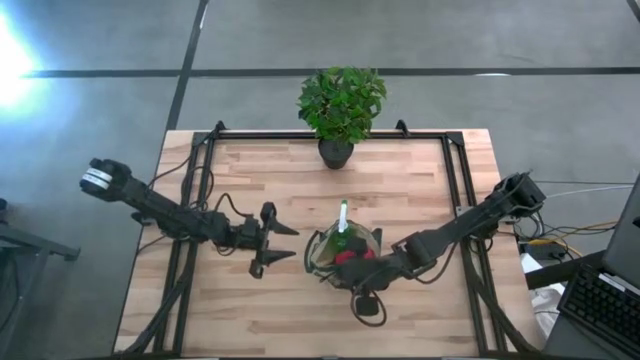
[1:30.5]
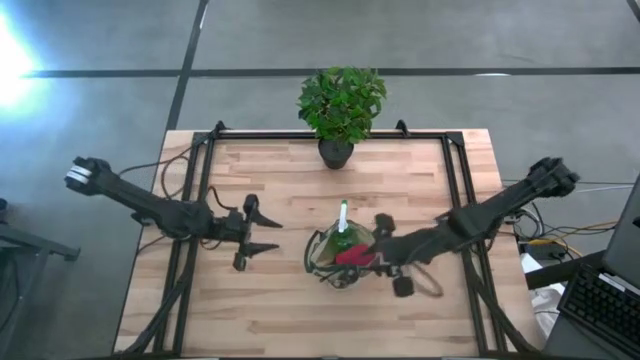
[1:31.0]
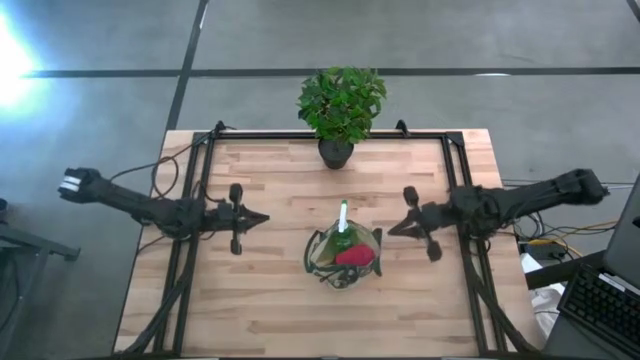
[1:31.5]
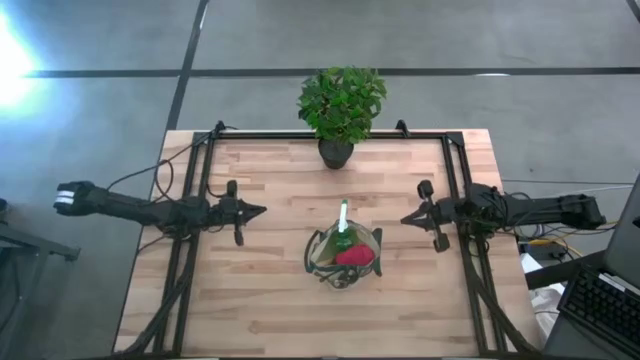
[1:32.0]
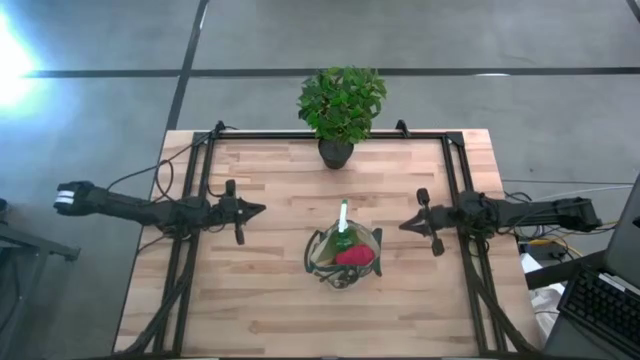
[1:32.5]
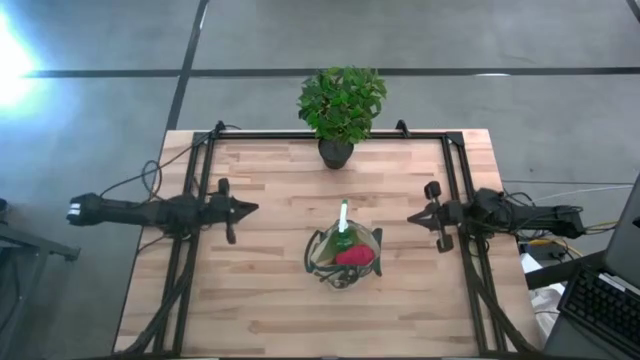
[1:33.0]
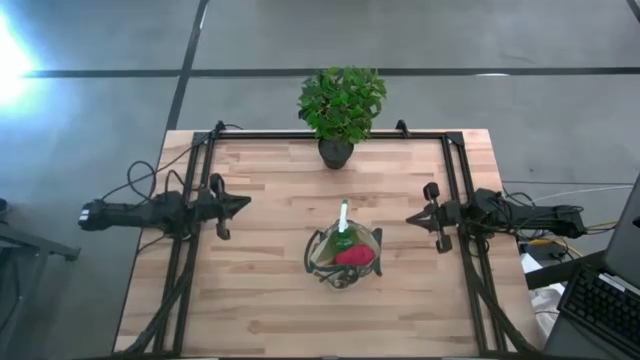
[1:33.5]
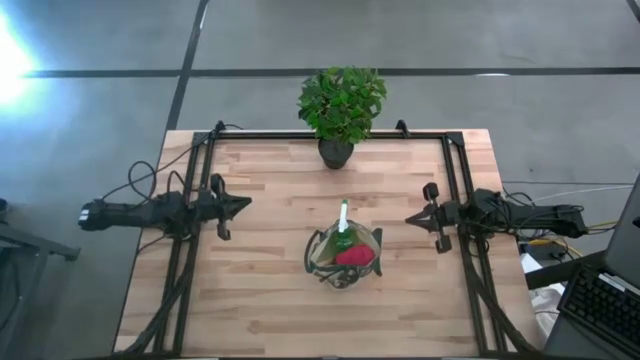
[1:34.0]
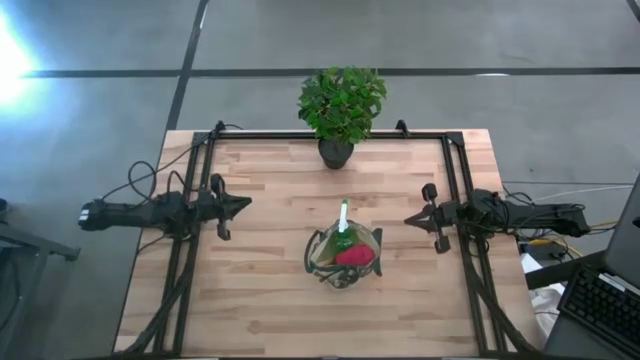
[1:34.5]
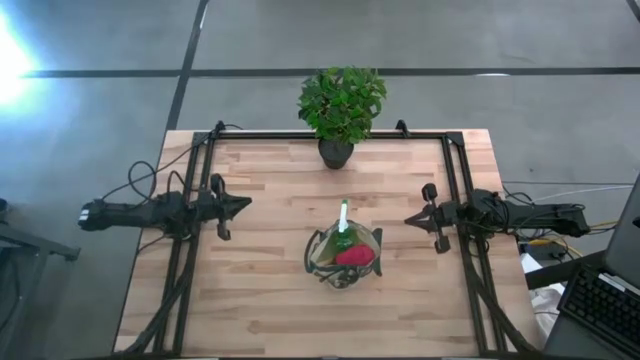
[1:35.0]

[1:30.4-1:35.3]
Task: Pick & Place Garden tools in Gardening bag
Return to Home Position

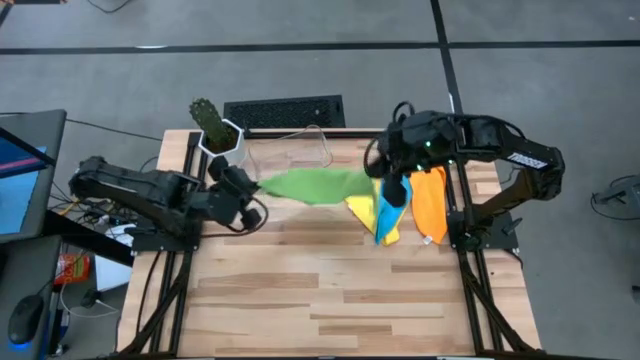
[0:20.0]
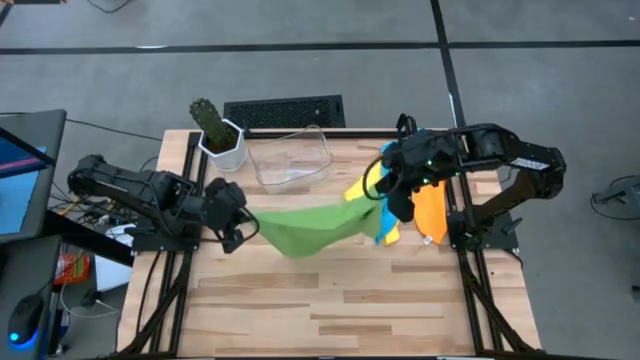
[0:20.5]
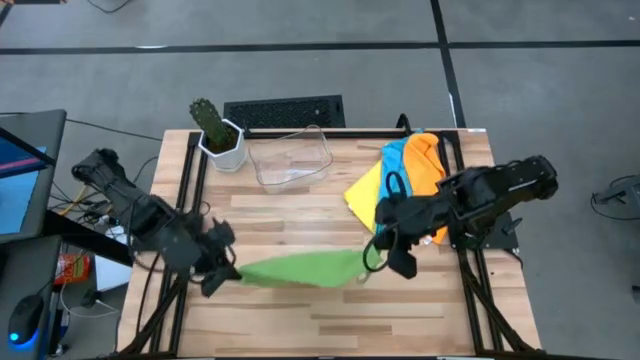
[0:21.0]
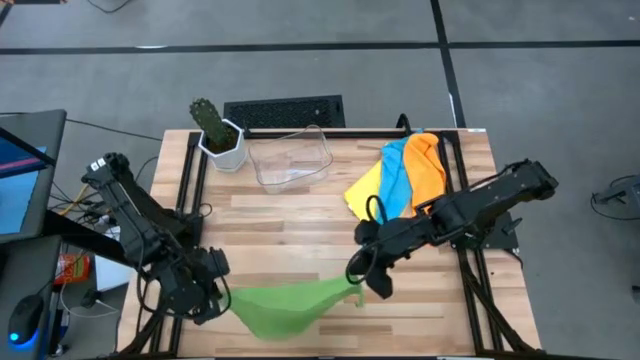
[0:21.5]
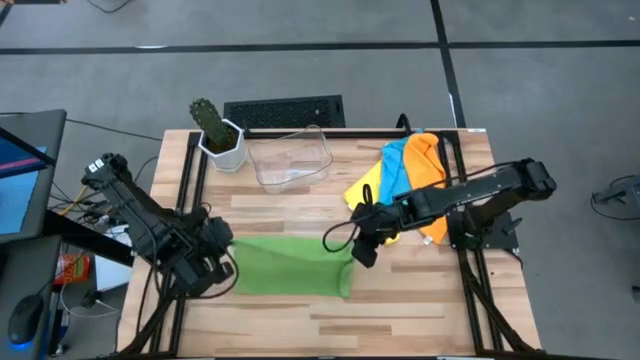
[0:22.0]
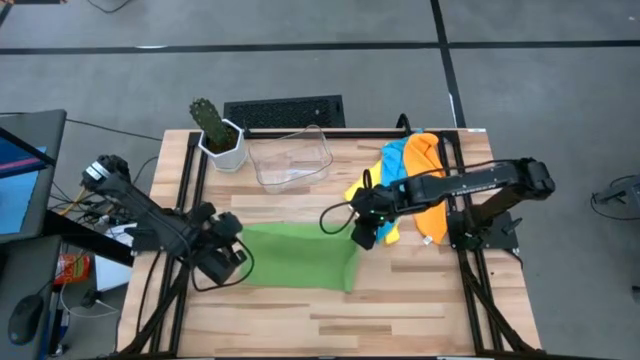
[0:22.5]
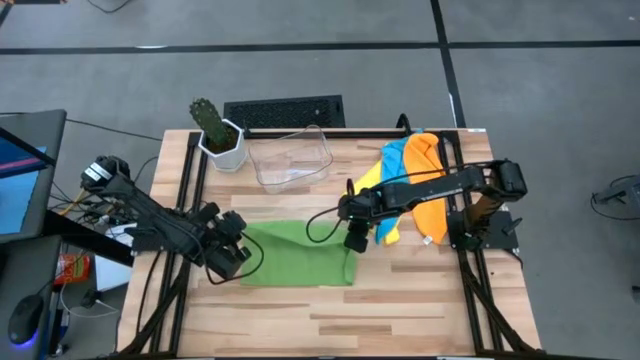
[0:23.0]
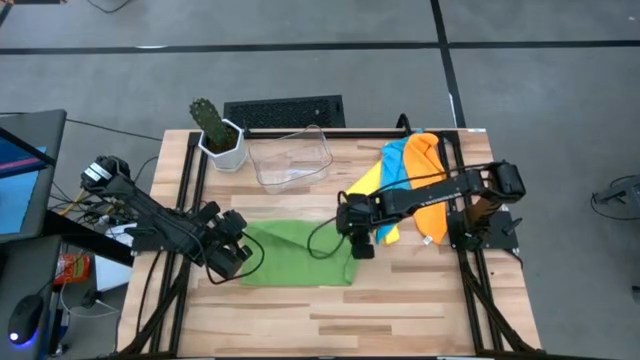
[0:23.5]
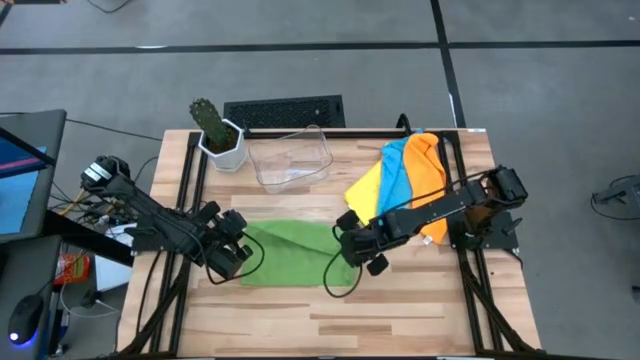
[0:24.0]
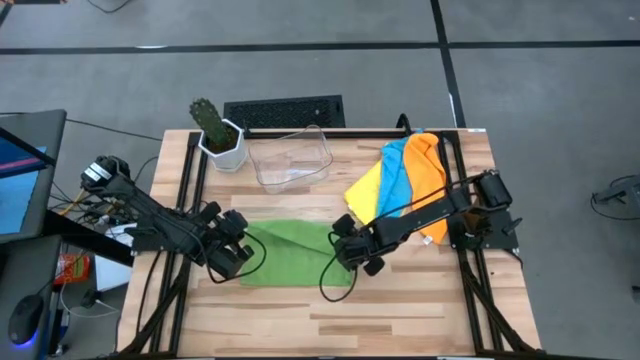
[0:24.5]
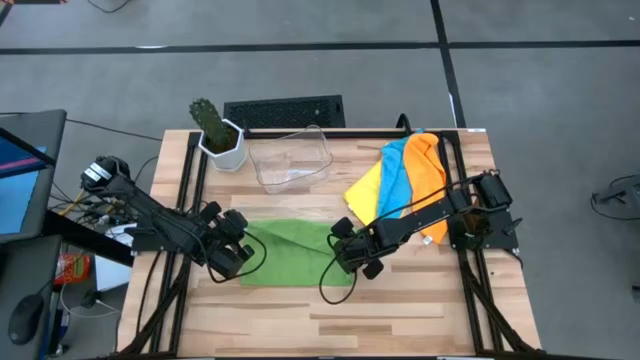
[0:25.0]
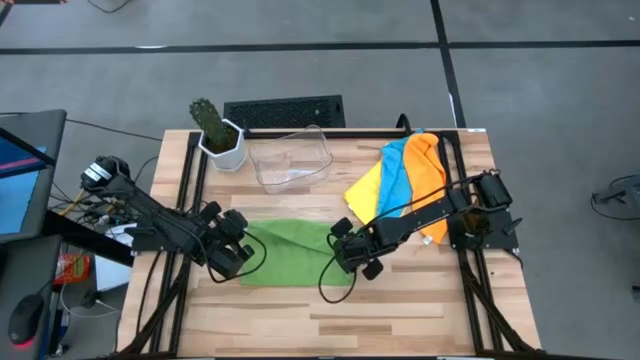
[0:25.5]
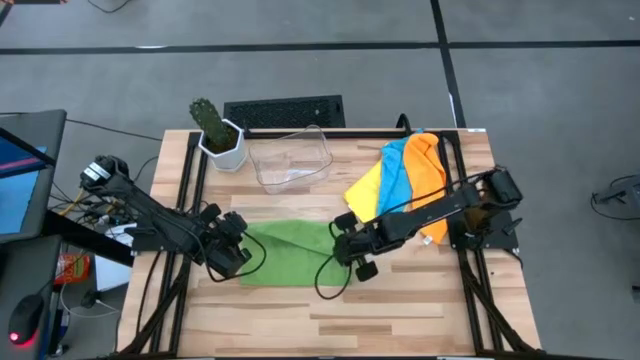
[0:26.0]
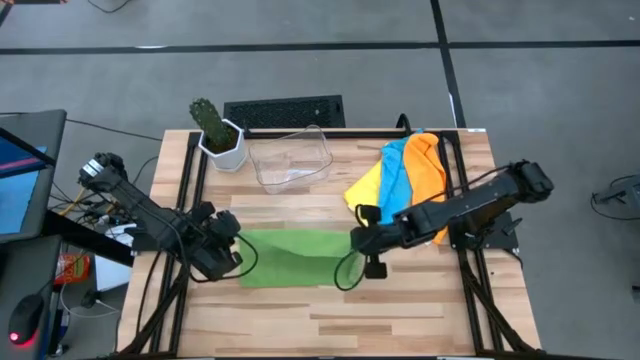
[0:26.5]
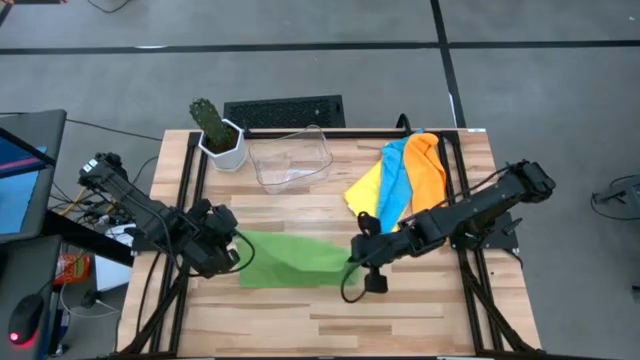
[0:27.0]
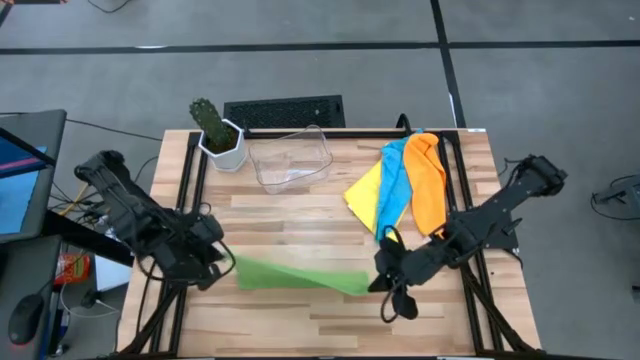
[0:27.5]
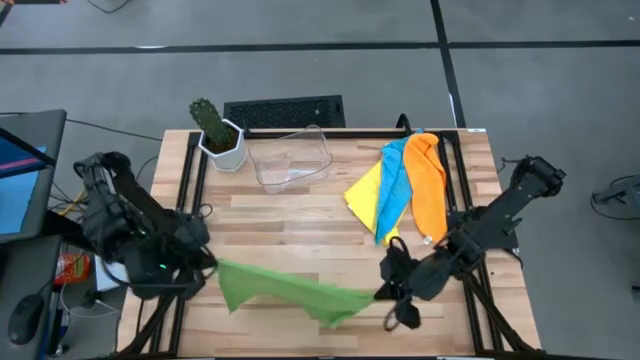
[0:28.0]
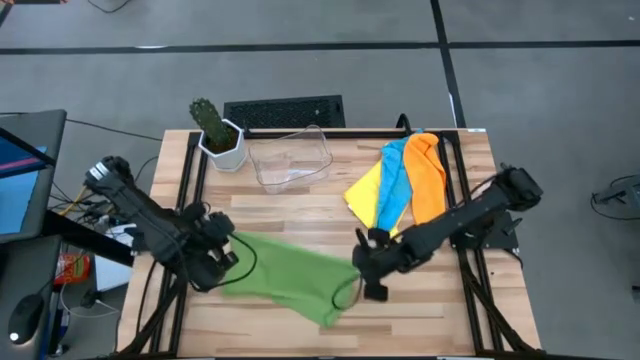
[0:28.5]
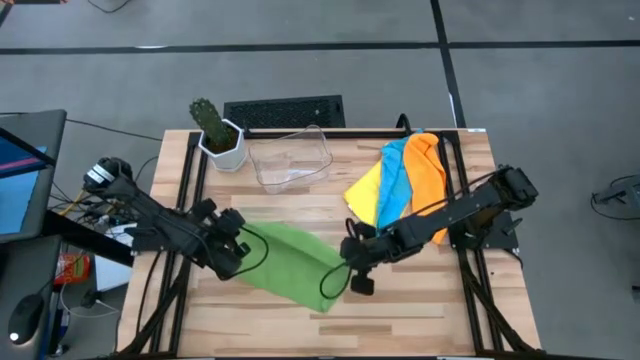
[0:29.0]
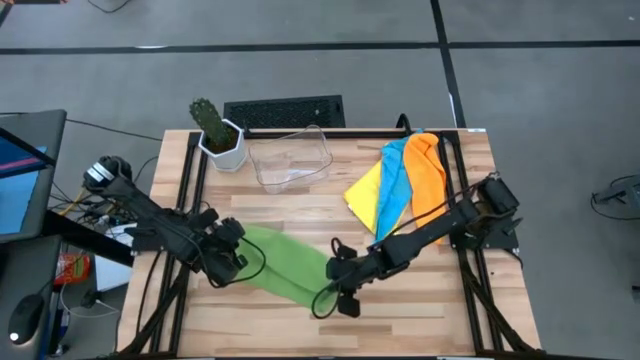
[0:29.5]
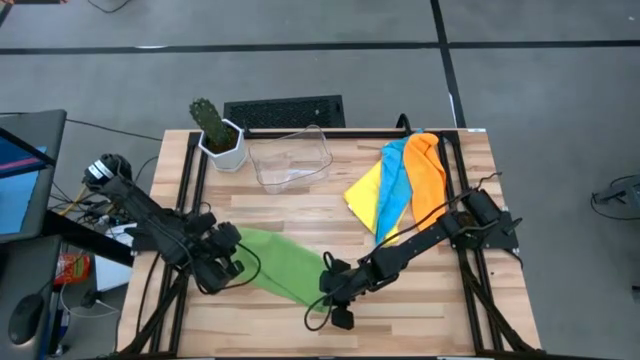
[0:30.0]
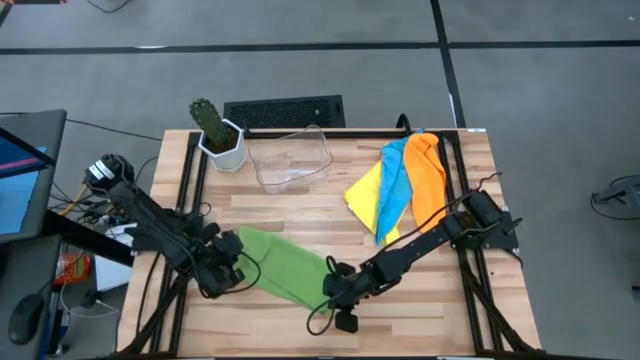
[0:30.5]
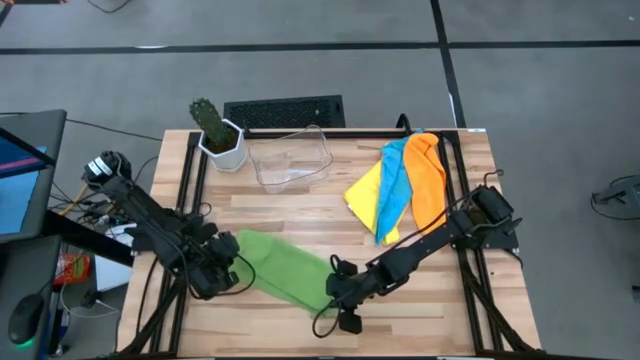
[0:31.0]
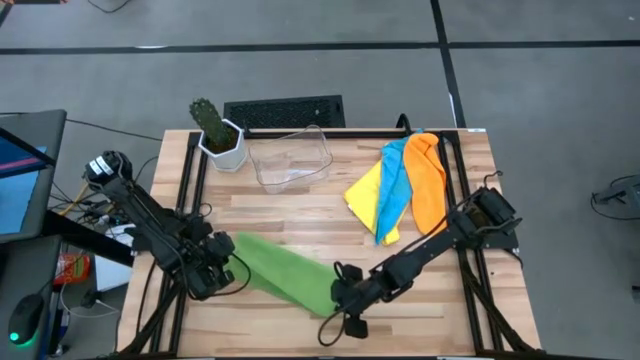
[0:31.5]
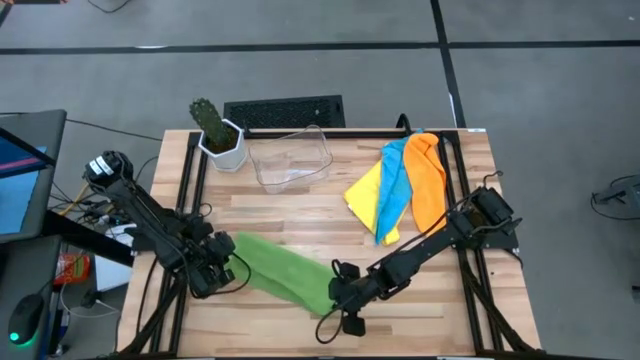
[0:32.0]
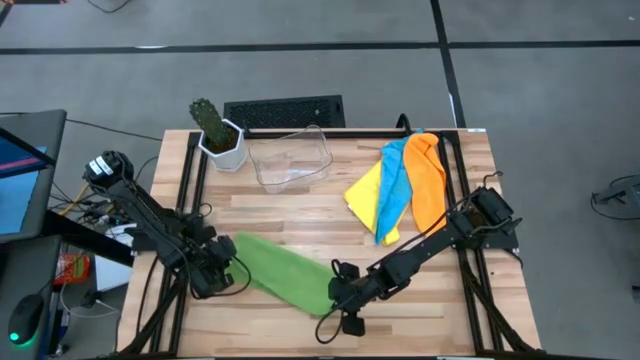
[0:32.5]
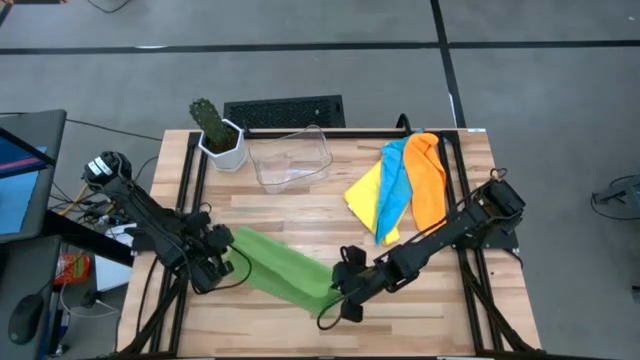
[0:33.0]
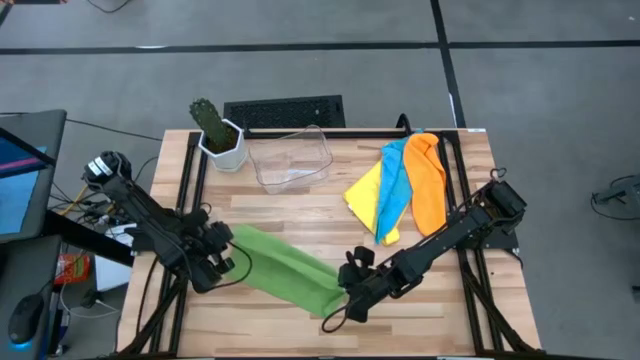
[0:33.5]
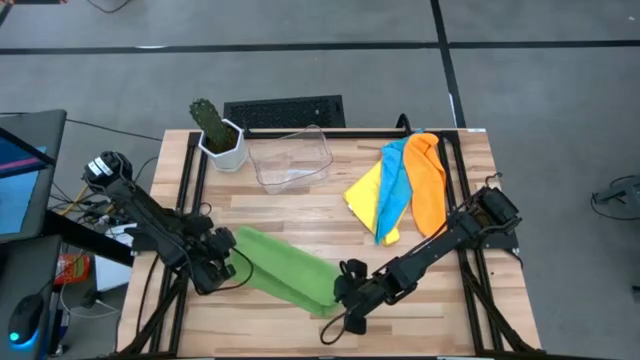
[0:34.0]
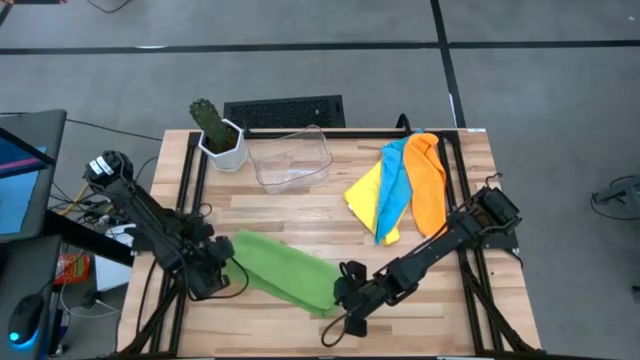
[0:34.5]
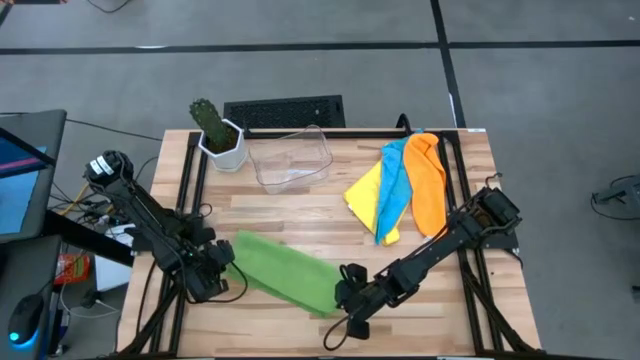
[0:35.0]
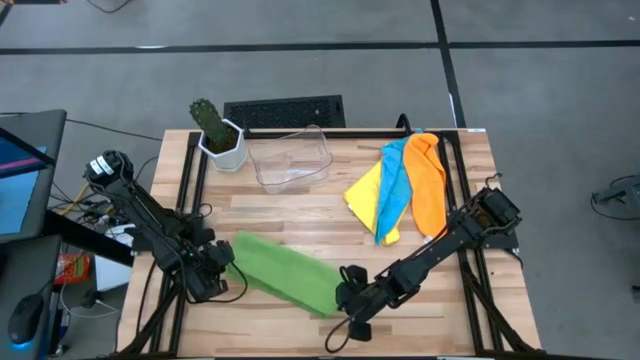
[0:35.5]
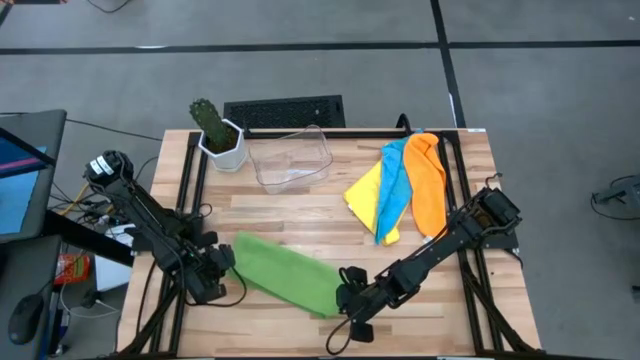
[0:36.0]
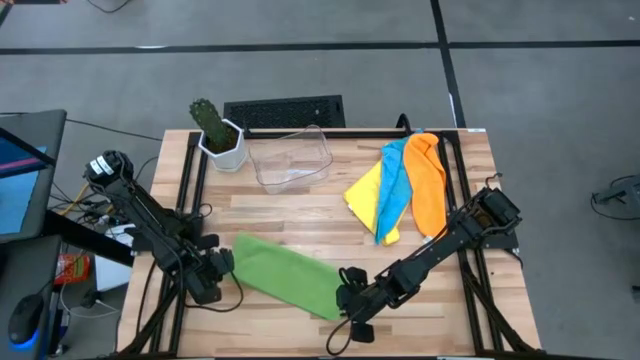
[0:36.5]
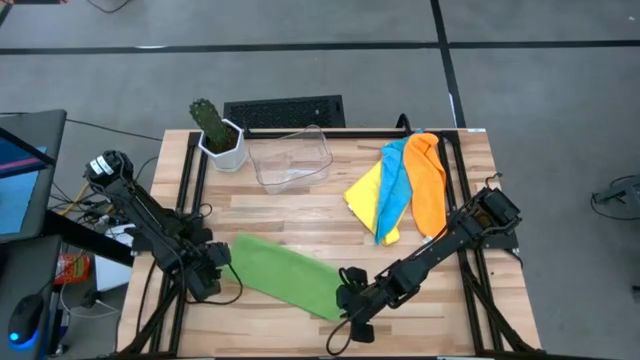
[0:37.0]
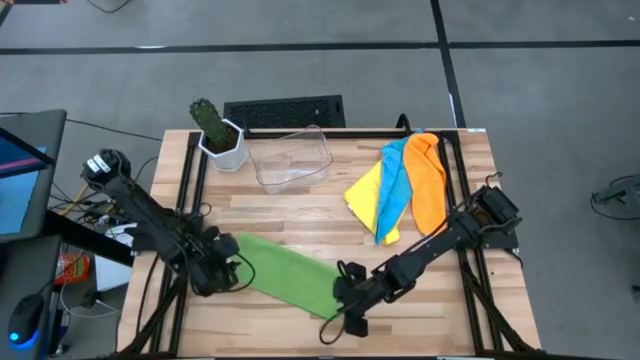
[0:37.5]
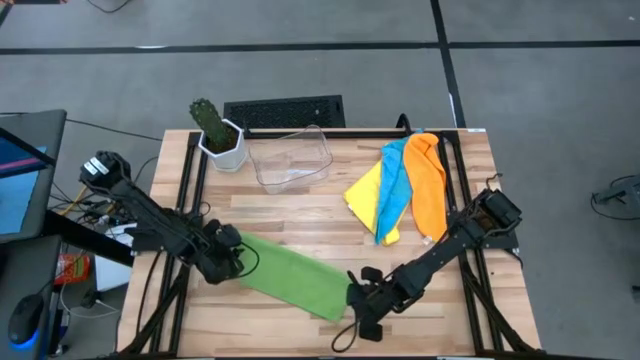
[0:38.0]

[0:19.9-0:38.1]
Task: Fold microfiber towels
Fold the green microfiber cloth
